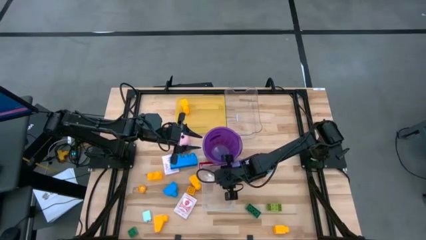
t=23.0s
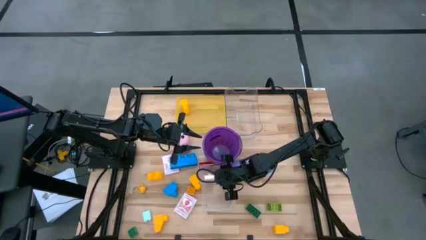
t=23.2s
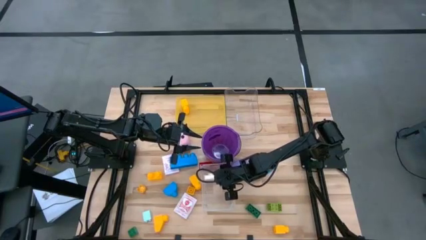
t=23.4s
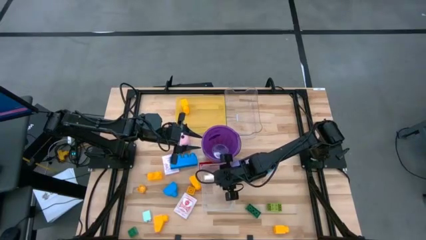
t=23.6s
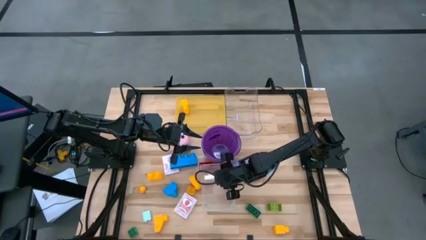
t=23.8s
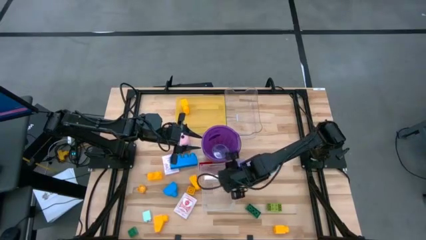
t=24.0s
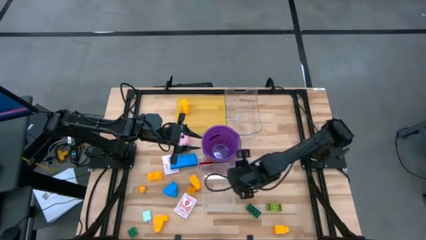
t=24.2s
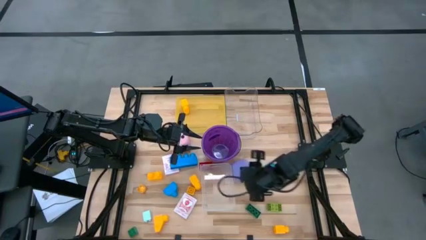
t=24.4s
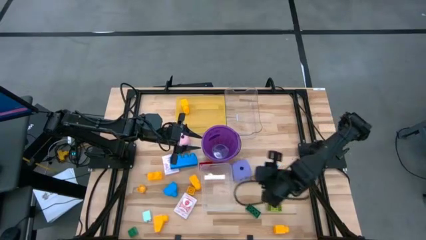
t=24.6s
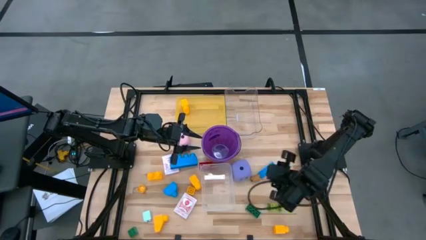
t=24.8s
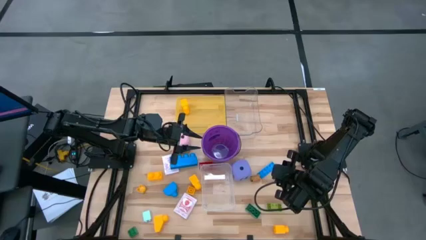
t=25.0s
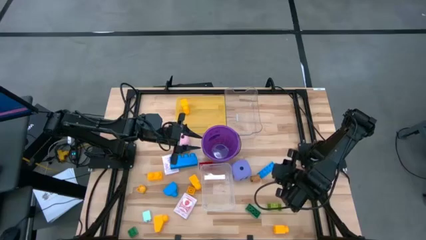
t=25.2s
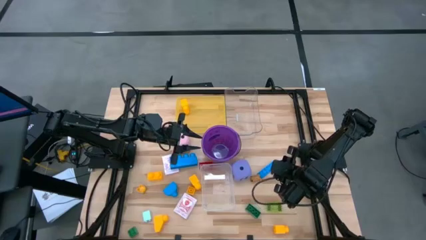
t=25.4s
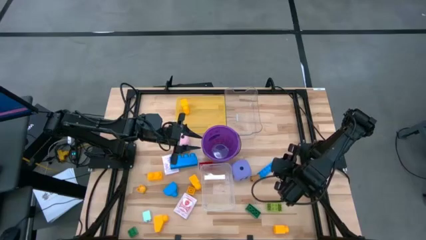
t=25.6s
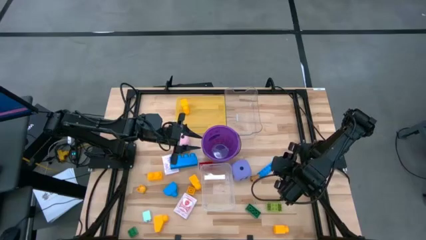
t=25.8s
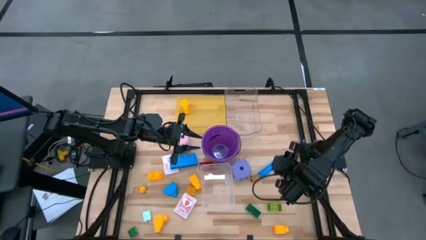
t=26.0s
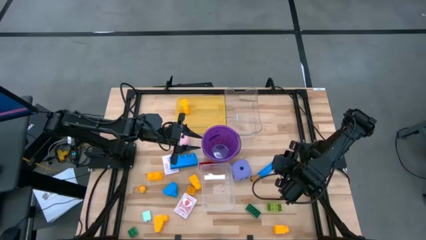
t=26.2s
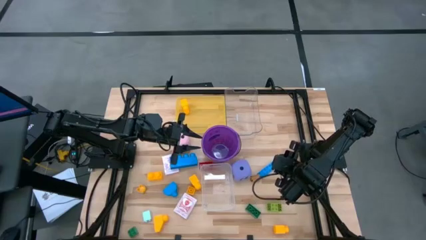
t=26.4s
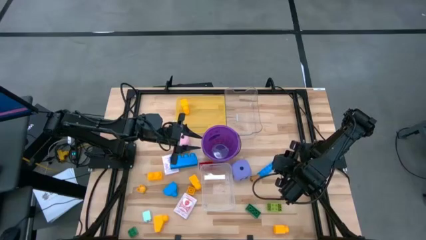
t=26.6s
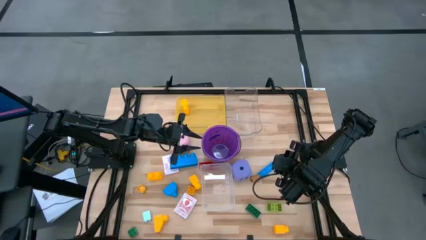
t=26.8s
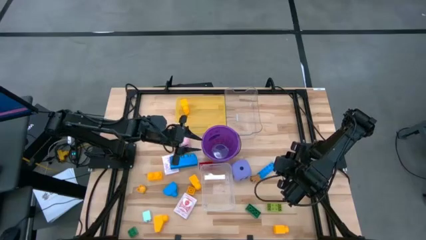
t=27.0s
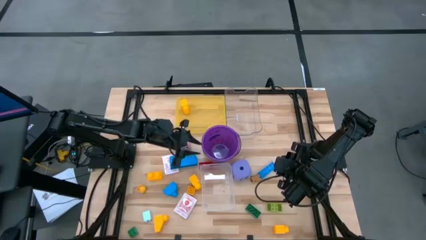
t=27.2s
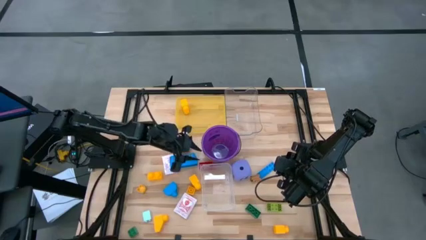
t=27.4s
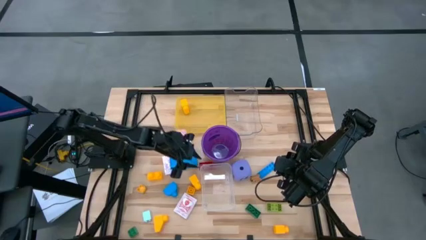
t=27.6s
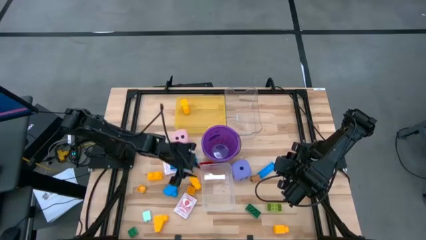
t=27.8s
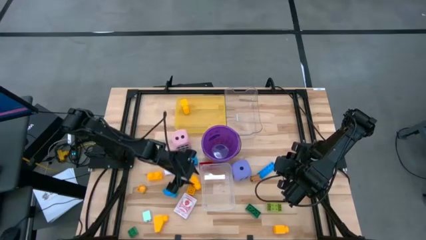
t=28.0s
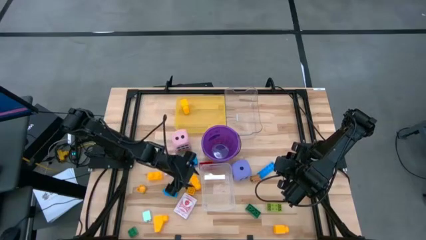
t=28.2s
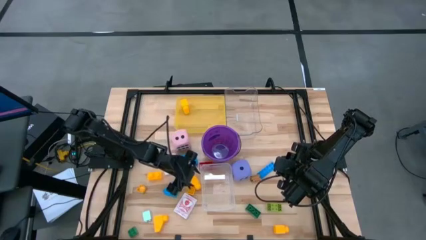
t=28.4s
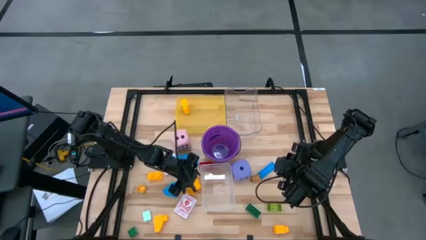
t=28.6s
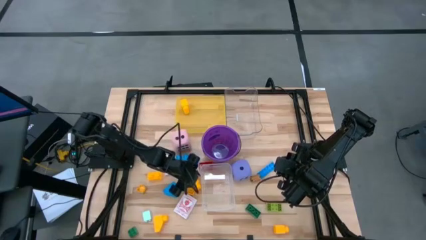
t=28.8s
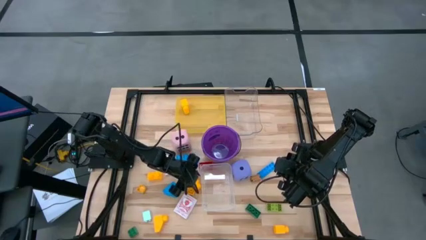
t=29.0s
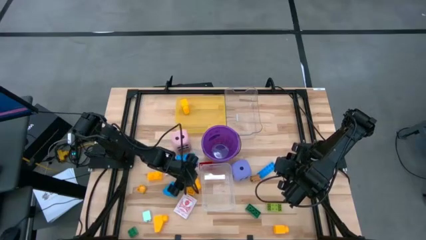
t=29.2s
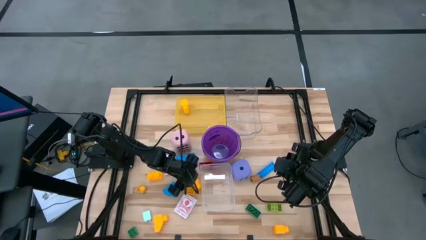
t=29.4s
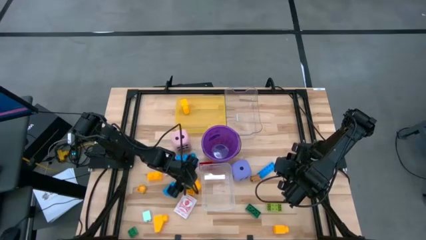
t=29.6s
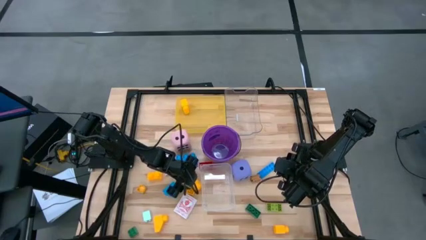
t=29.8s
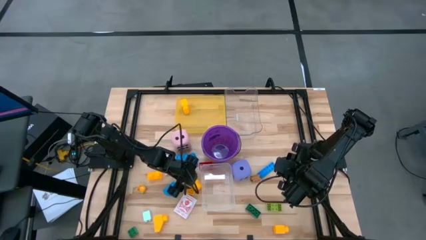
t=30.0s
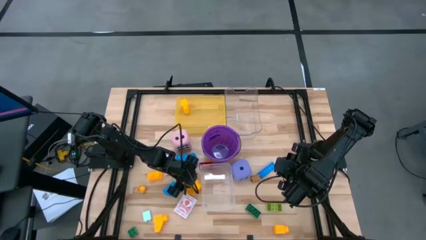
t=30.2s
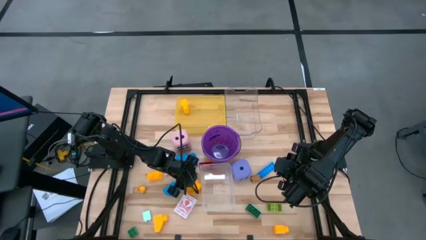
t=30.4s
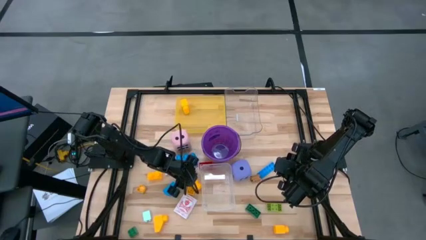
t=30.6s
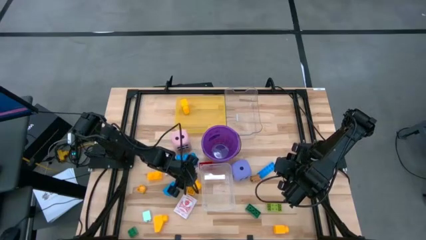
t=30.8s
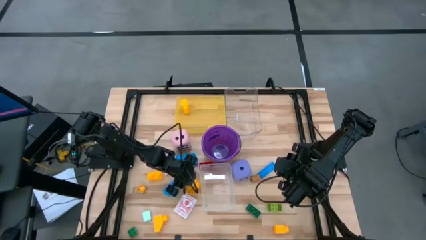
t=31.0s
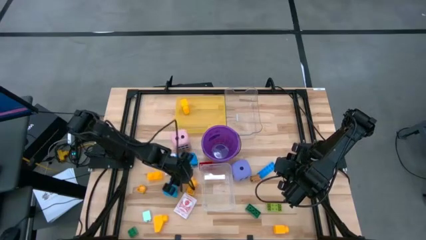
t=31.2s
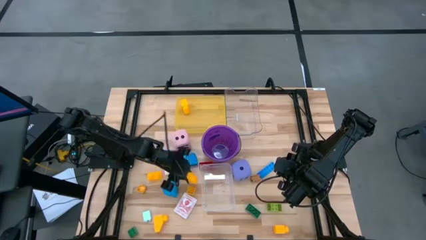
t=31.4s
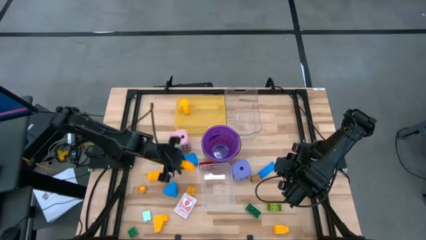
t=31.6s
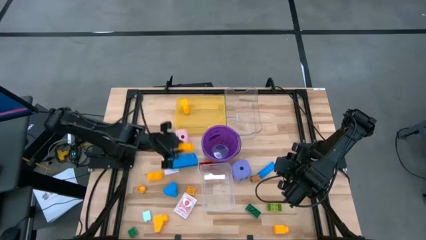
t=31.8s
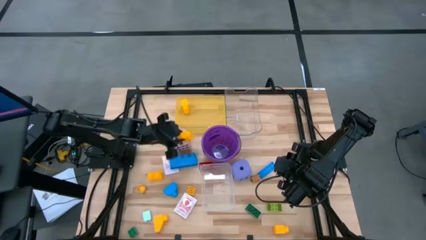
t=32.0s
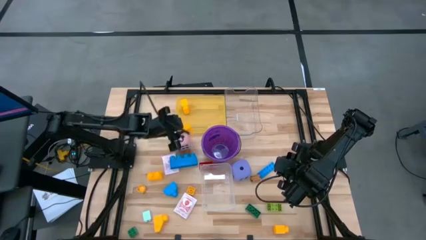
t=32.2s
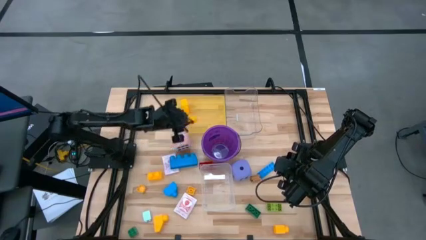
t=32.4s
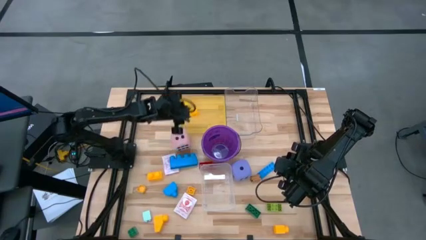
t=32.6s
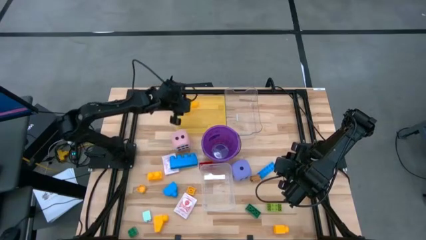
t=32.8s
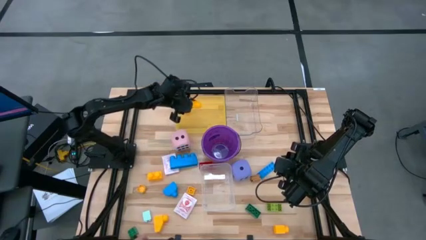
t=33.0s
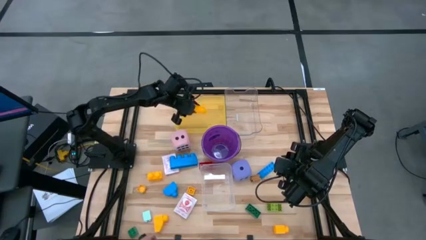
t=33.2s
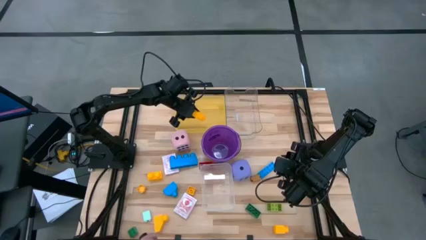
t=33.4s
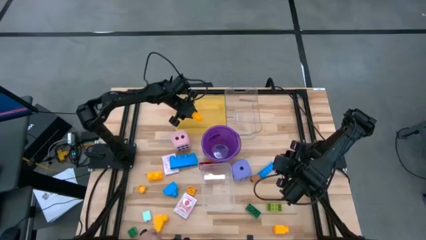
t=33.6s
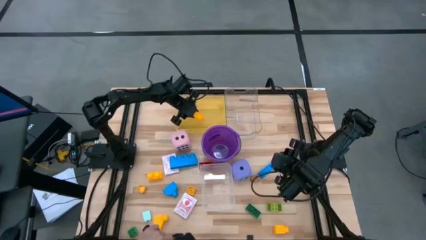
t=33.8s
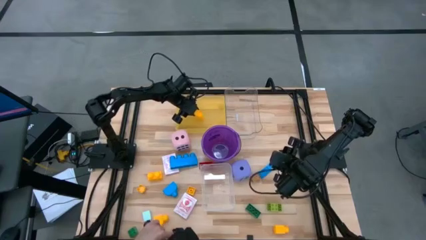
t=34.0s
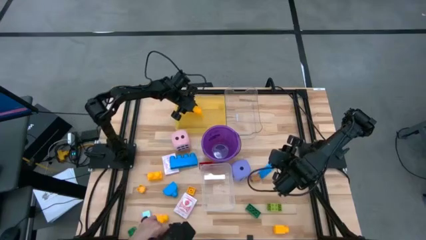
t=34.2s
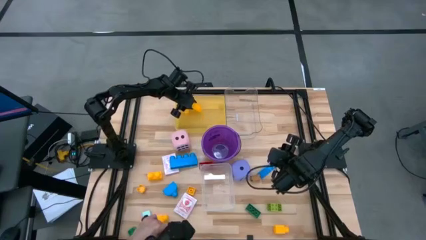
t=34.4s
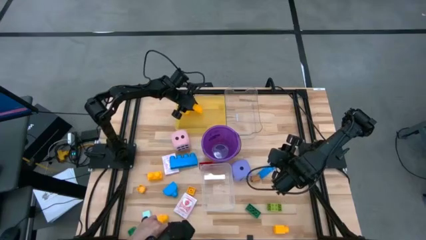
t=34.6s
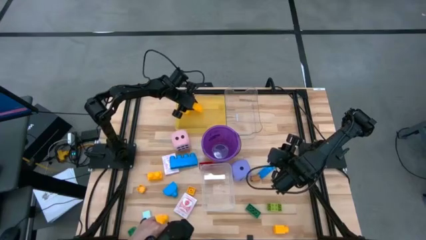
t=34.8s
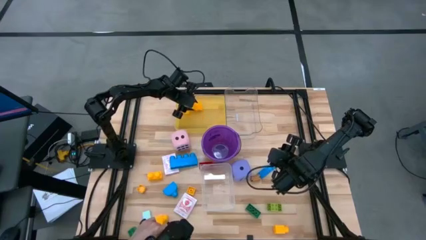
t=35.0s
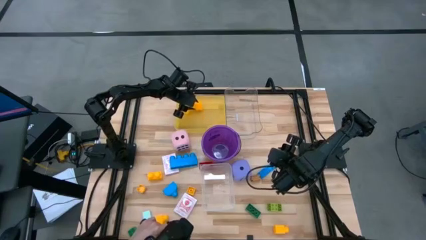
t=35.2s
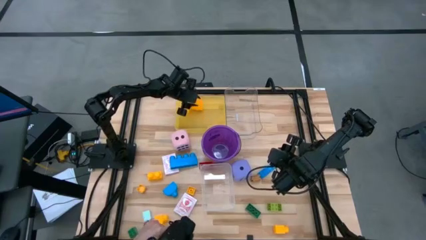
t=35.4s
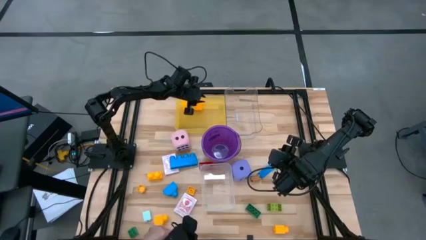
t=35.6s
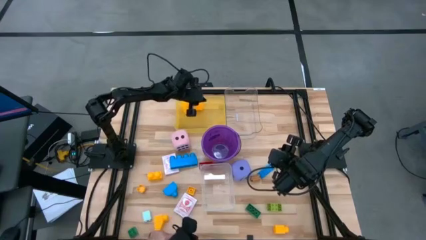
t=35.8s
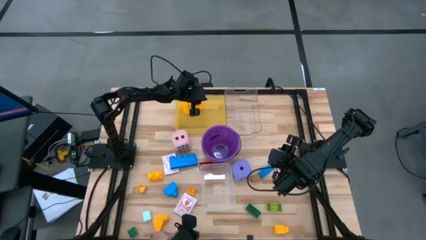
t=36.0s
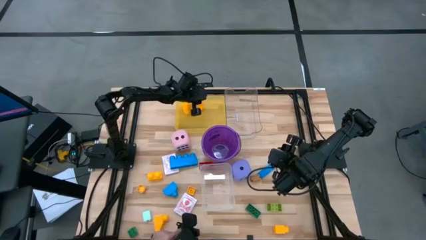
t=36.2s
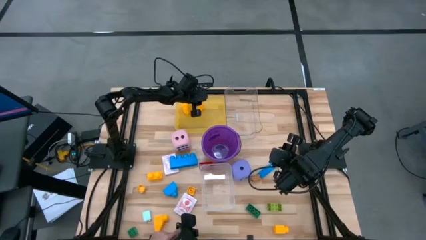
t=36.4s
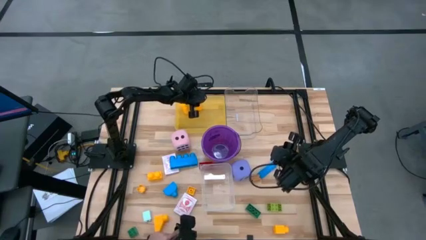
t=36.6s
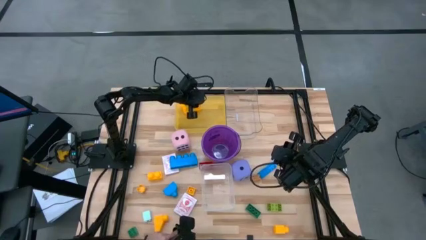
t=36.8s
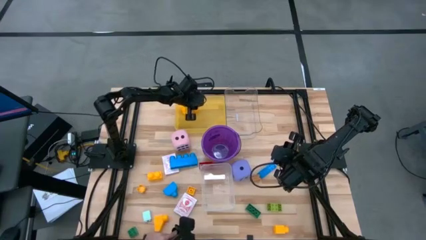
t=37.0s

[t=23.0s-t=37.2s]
Task: Pick & Place Toys
Put the yellow game piece into the yellow bin

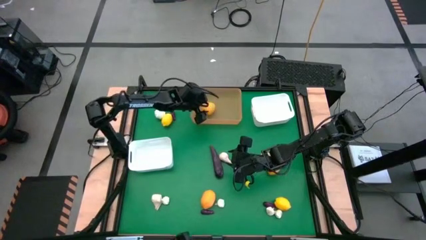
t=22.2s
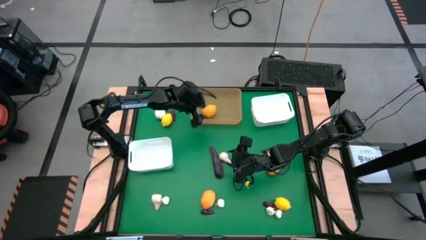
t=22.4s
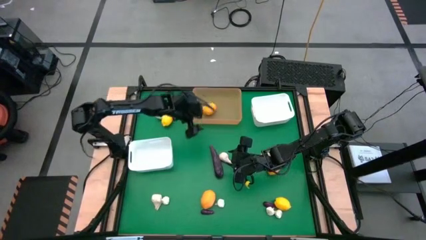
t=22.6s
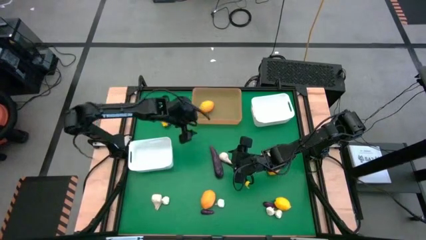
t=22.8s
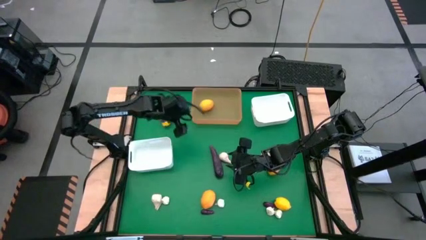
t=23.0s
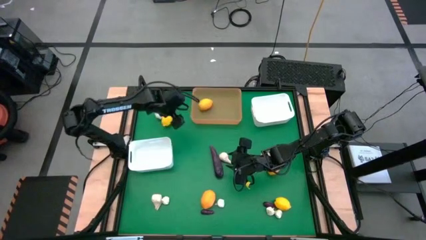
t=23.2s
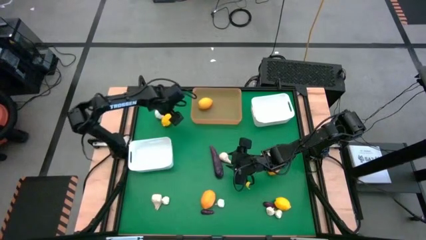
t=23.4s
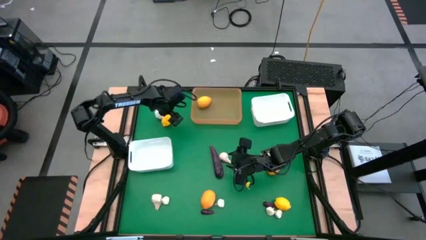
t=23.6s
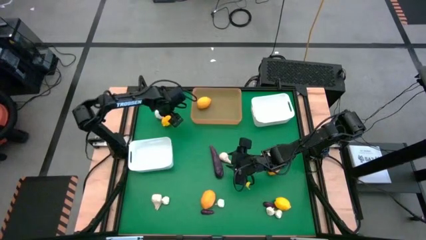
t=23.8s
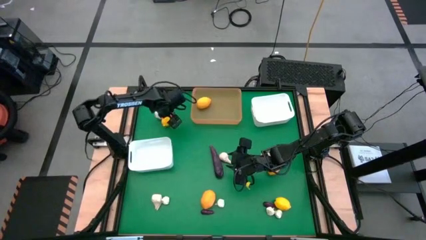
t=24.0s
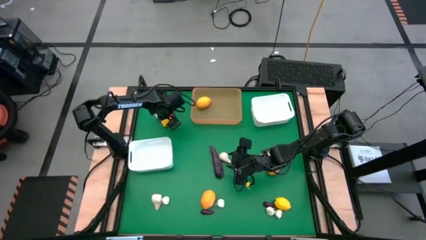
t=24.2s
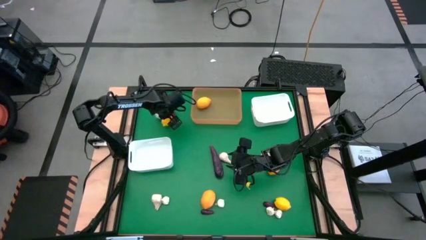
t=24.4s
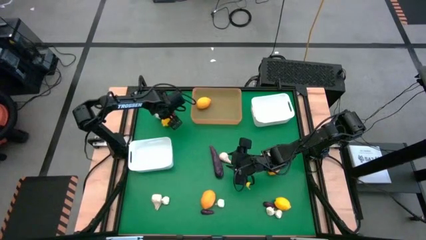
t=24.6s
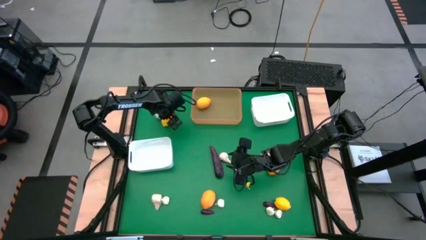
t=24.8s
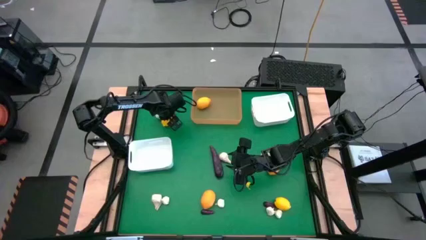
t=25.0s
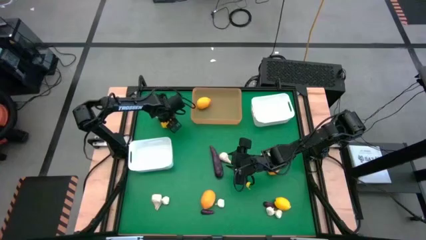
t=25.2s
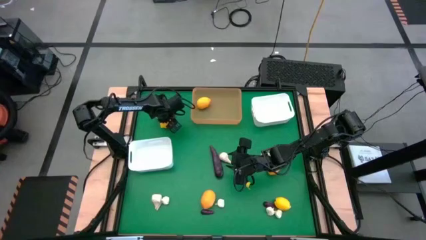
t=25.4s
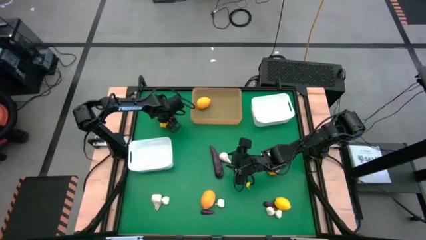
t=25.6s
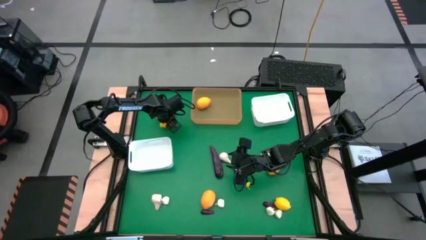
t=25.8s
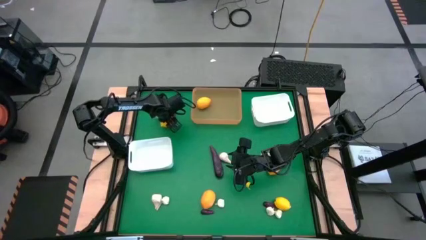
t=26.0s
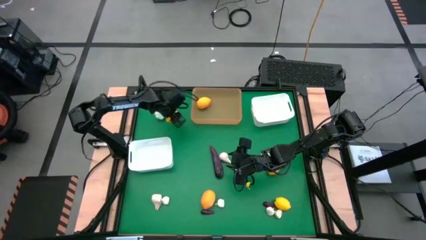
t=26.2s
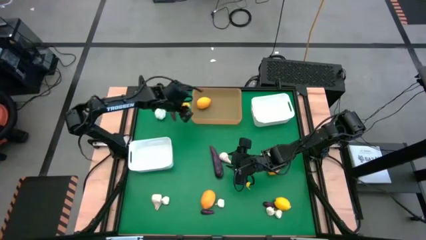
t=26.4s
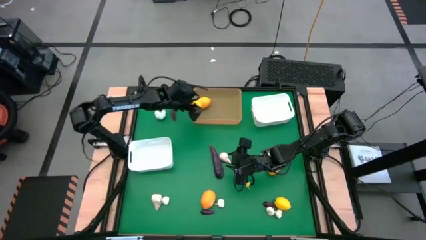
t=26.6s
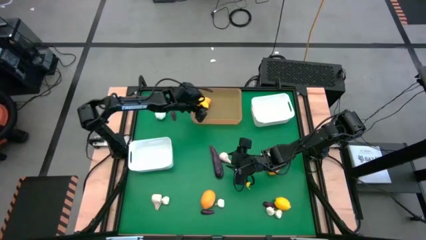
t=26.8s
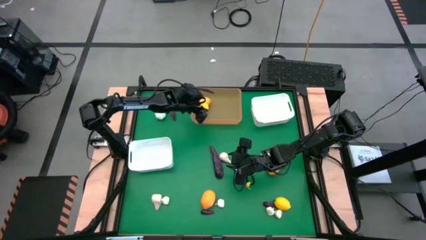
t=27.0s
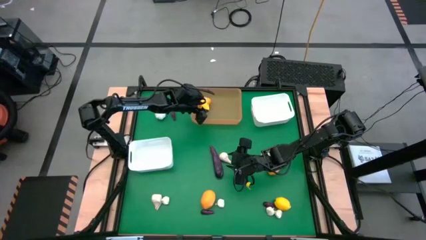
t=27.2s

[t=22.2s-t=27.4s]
Task: Sort produce into baskets
Put the lemon into the yellow bin
